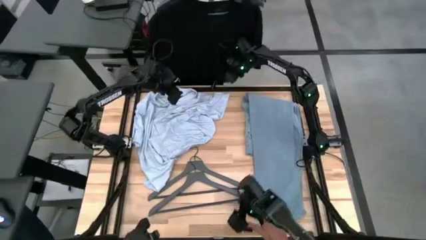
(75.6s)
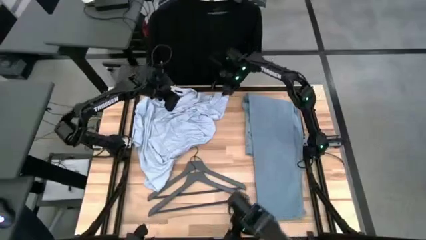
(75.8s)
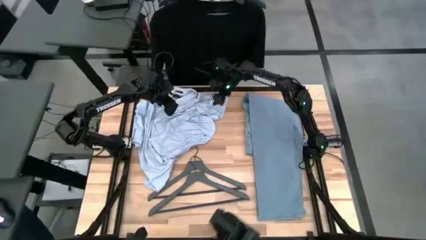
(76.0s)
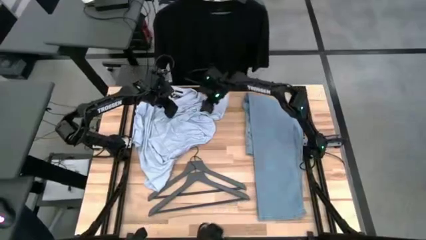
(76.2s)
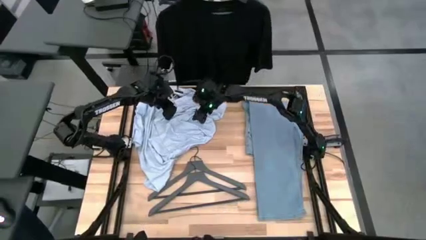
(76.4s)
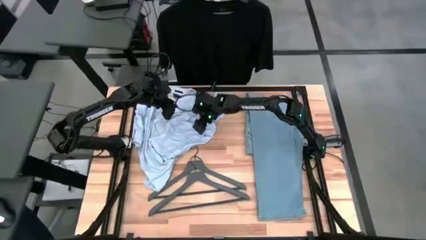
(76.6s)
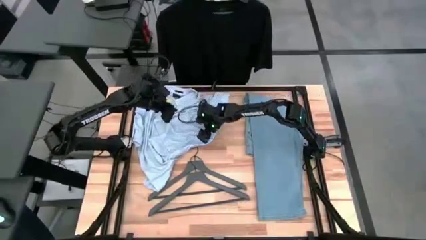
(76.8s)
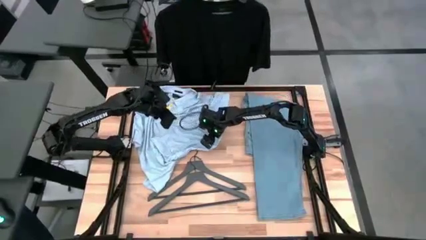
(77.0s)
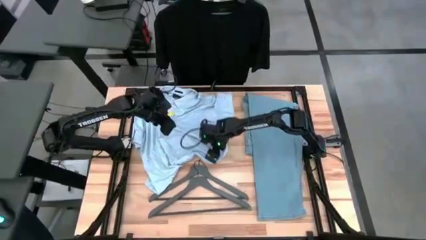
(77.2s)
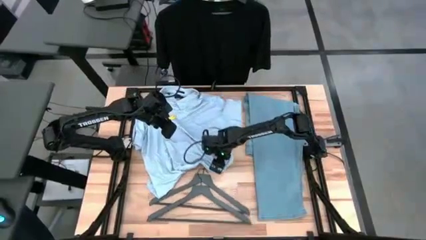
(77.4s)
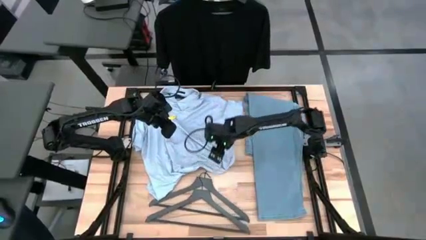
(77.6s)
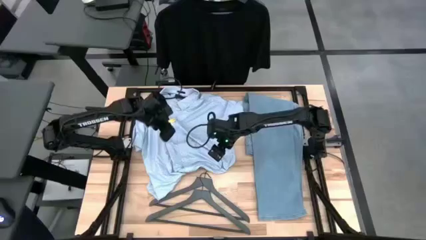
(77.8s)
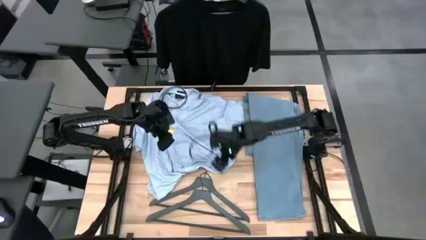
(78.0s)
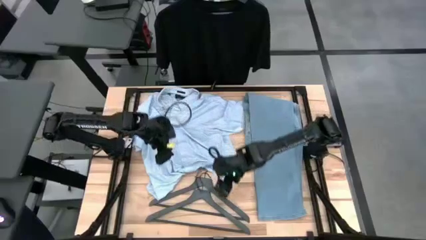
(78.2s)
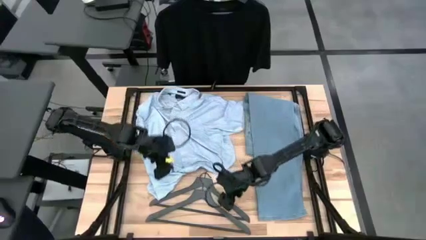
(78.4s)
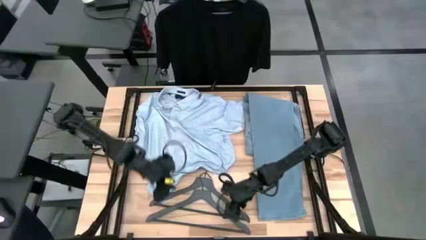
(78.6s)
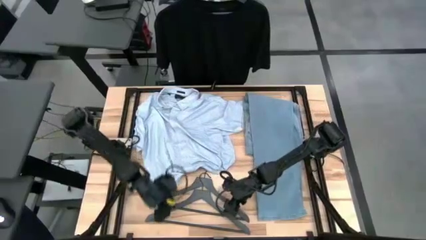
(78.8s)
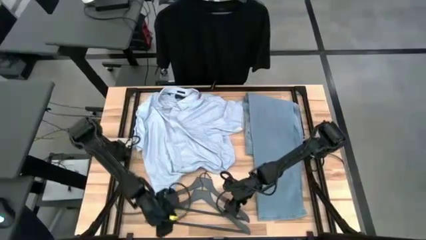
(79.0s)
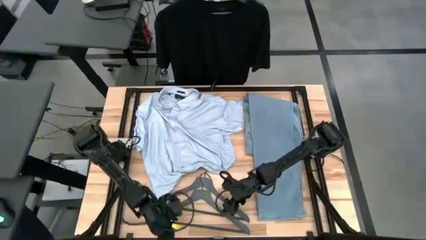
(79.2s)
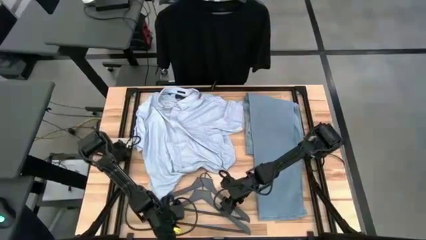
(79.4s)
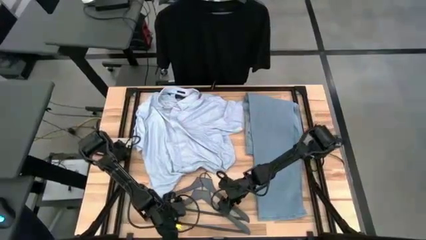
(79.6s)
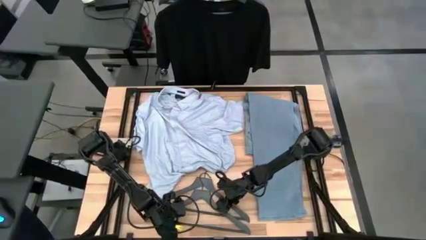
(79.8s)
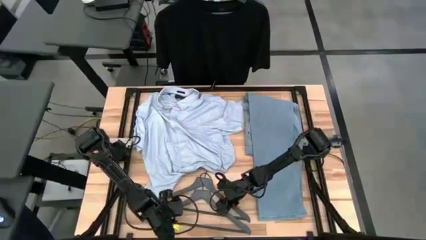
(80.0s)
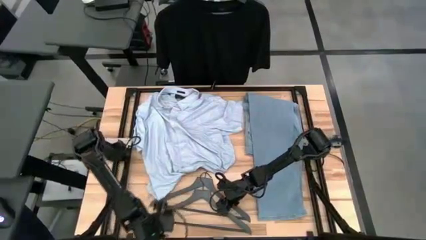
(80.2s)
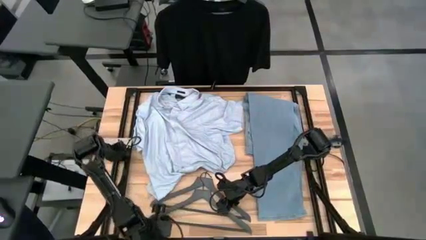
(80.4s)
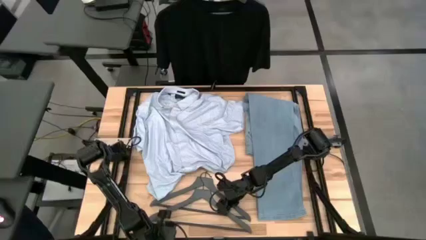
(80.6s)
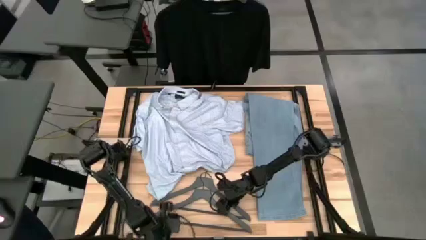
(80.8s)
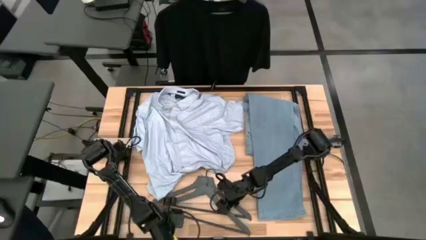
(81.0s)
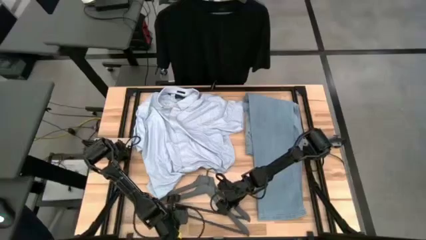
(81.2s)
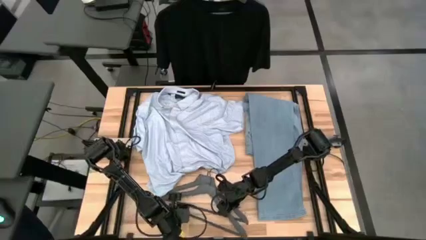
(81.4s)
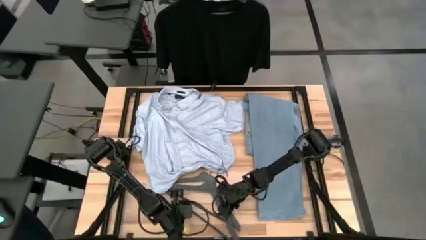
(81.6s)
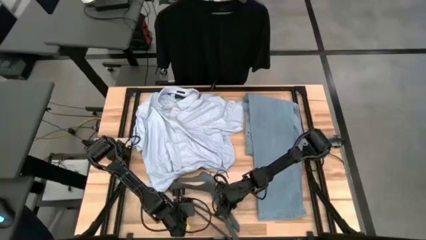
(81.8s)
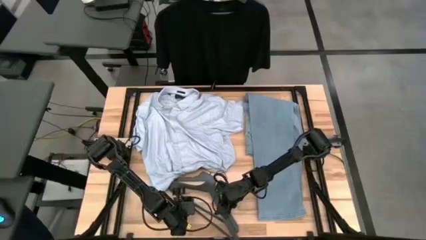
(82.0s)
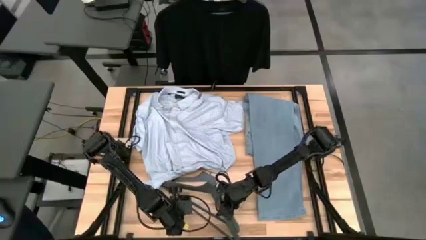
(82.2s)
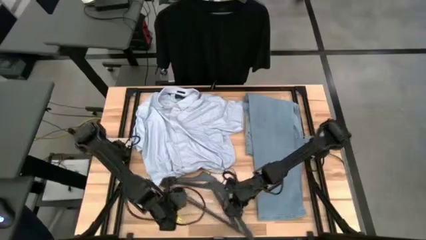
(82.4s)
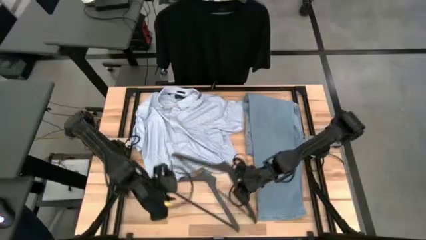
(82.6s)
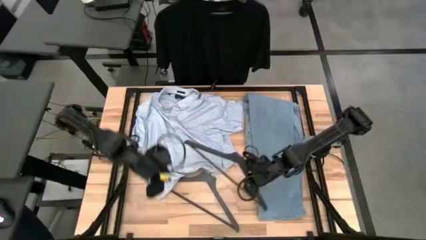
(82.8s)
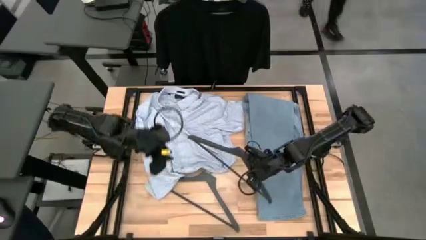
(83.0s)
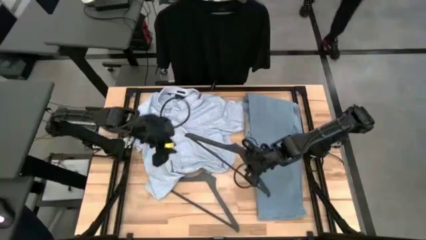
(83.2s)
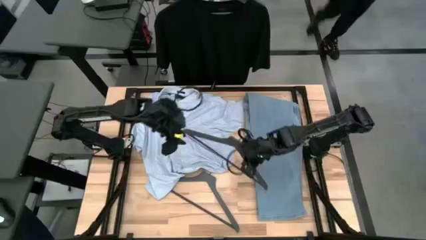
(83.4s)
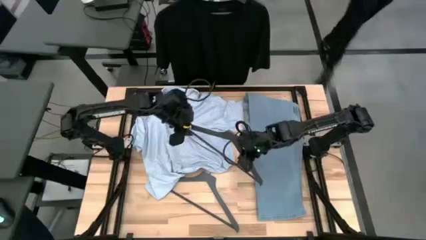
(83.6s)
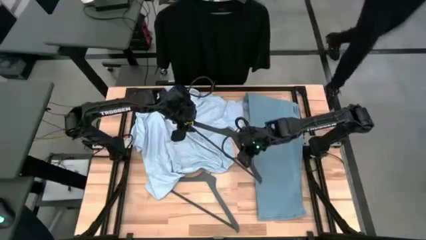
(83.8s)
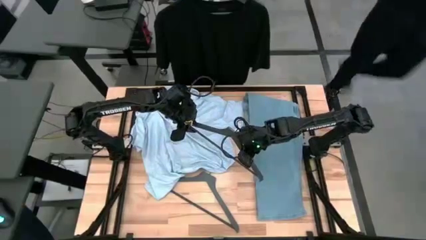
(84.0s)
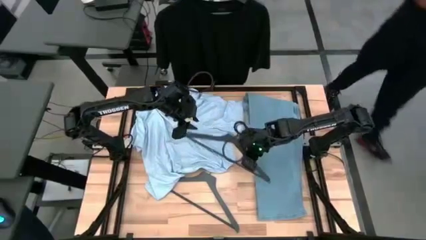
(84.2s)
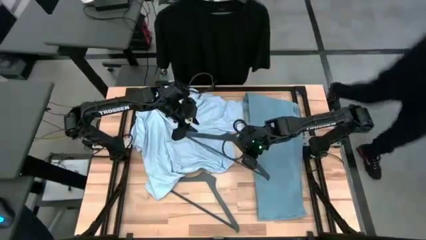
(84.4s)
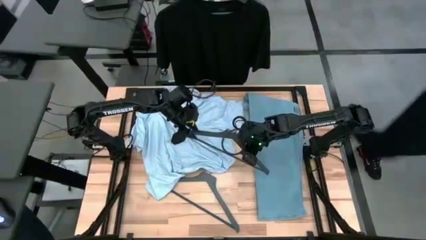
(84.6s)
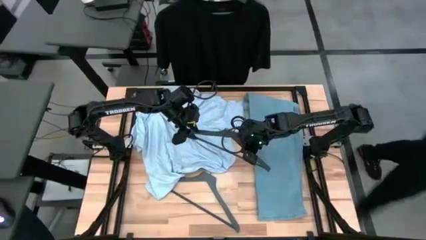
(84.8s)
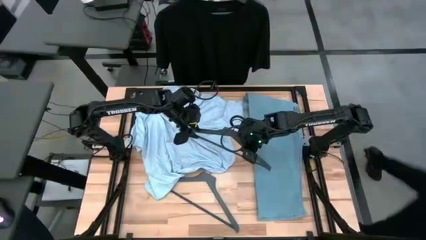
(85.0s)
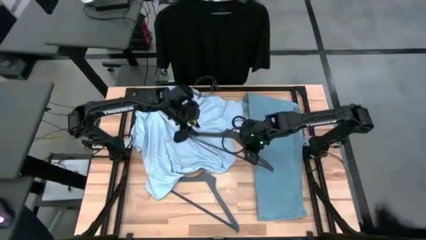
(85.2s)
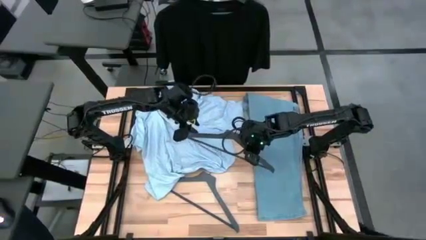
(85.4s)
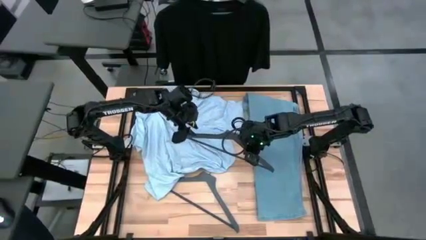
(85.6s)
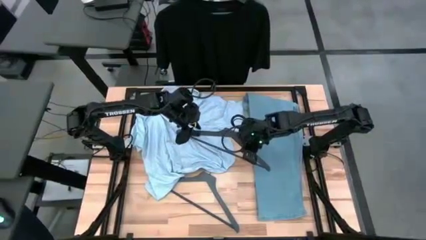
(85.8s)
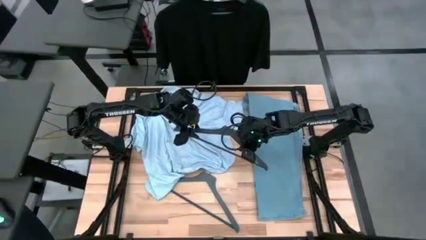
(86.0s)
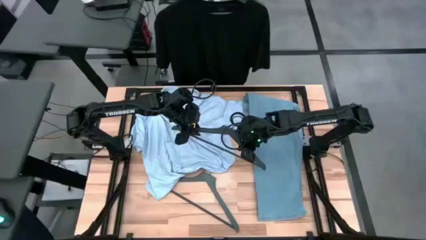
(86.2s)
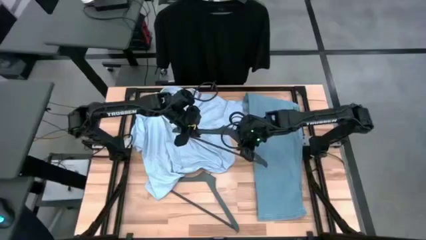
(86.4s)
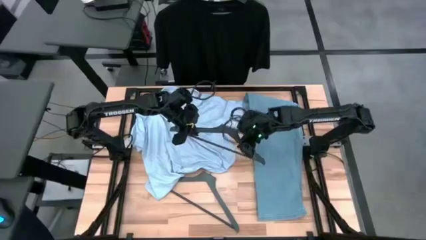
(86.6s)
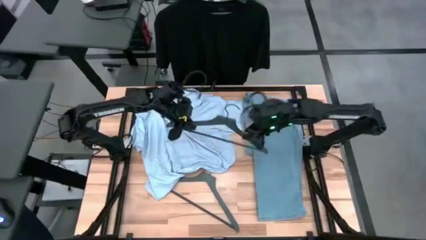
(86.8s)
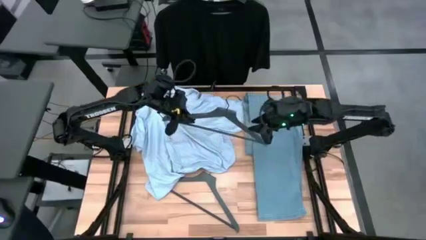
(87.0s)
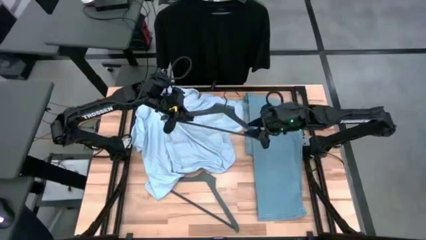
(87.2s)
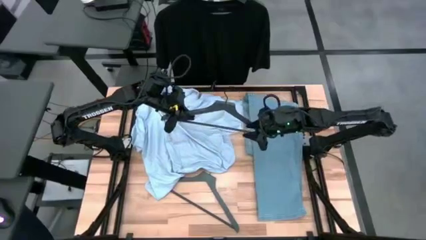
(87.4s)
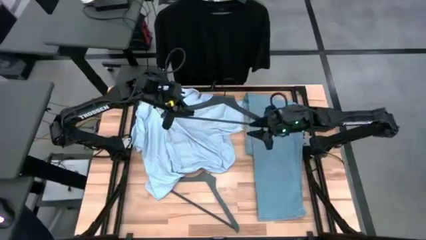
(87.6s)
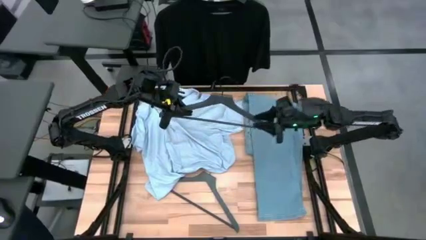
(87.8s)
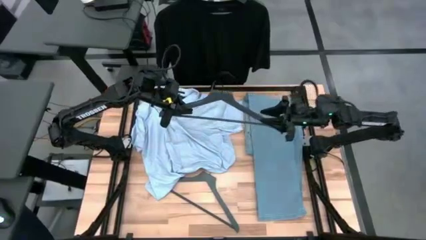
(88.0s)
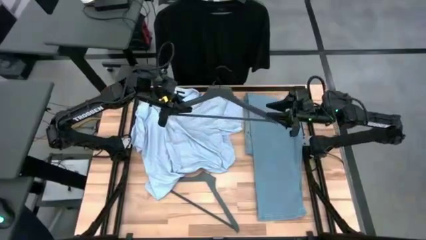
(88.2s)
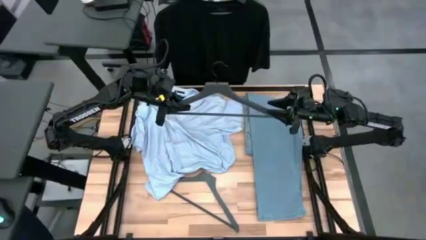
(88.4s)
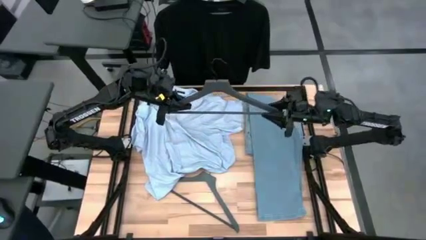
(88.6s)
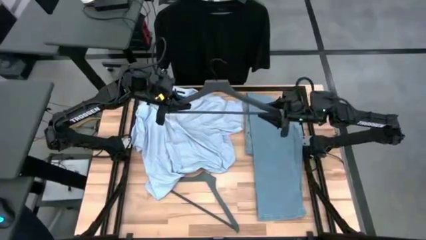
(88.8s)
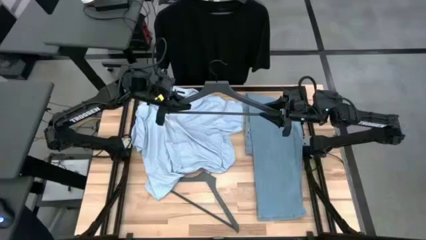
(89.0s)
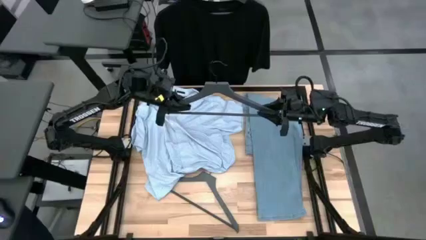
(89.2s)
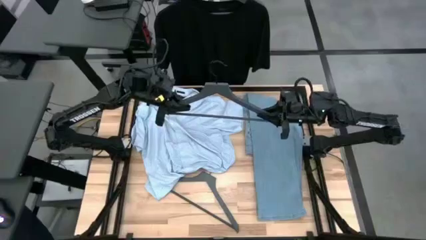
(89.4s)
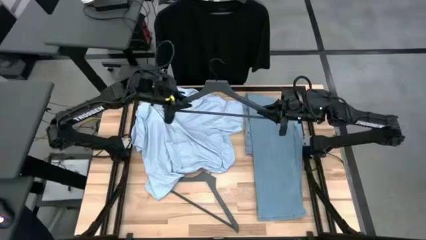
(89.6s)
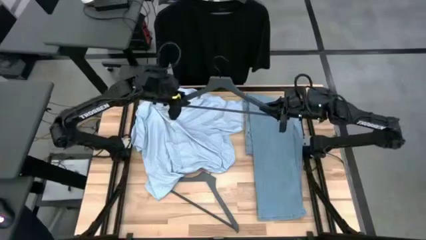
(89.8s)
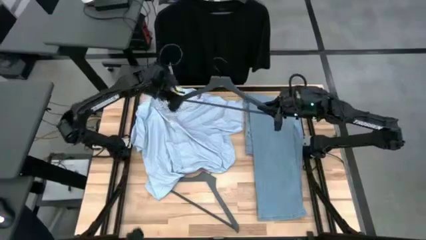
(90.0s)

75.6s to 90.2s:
Task: Hang clothes
Insert the blue shirt on the grey hanger

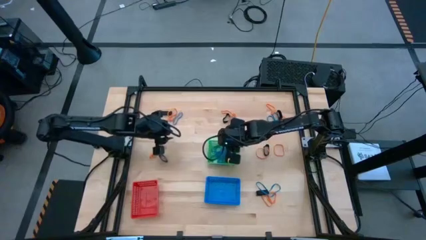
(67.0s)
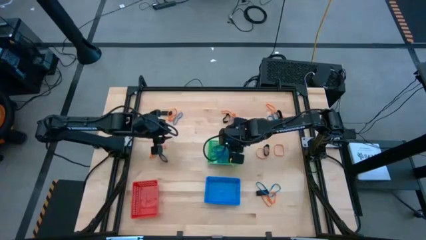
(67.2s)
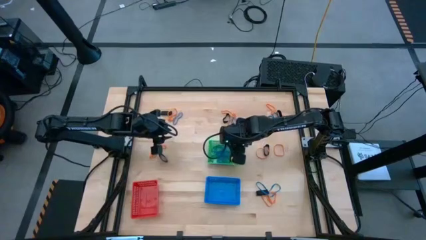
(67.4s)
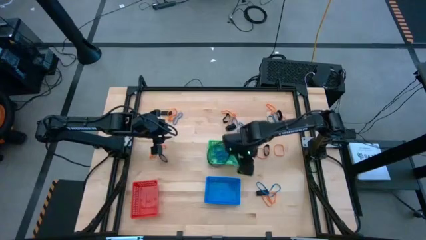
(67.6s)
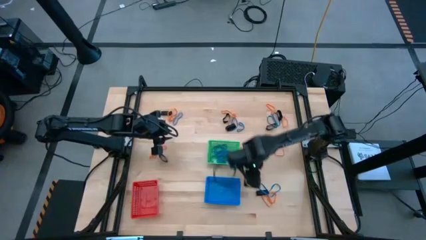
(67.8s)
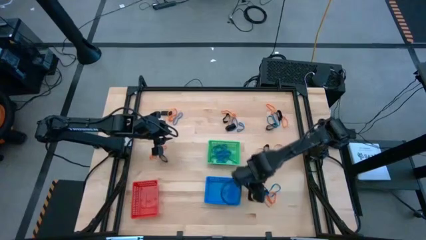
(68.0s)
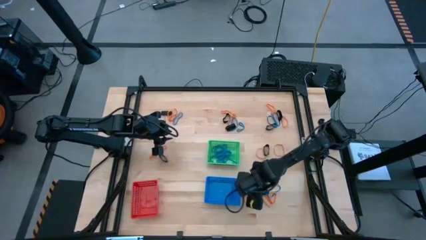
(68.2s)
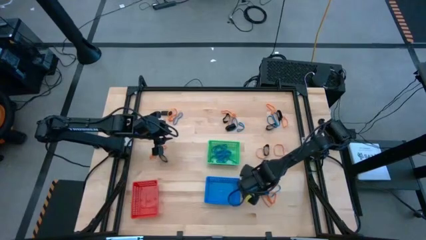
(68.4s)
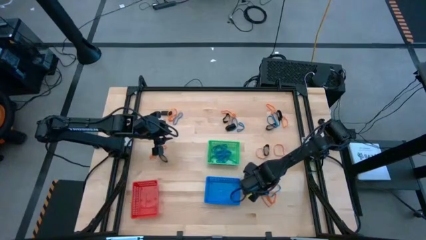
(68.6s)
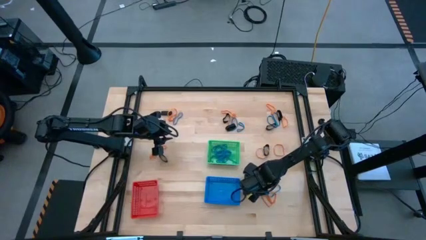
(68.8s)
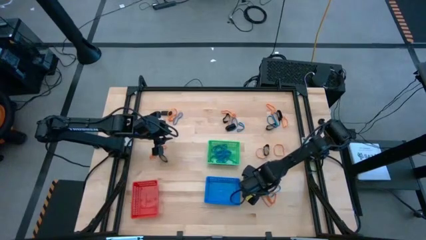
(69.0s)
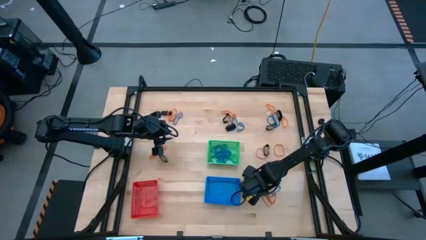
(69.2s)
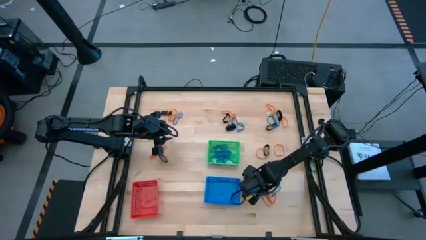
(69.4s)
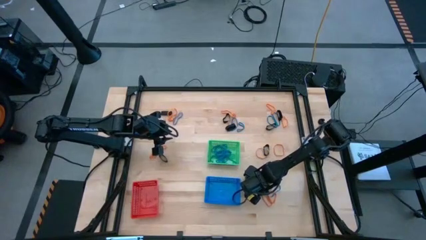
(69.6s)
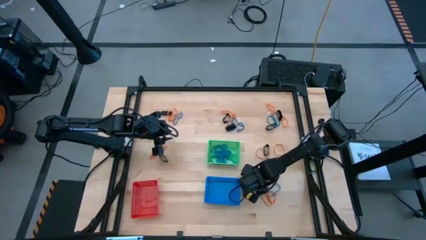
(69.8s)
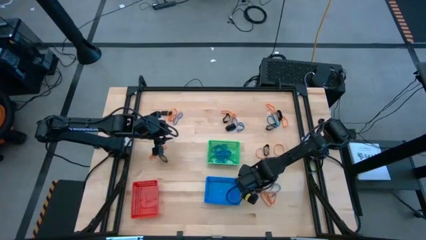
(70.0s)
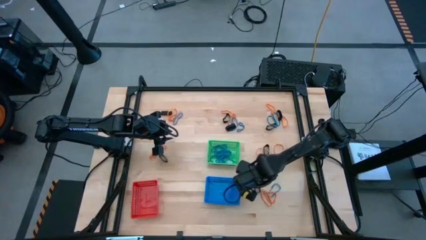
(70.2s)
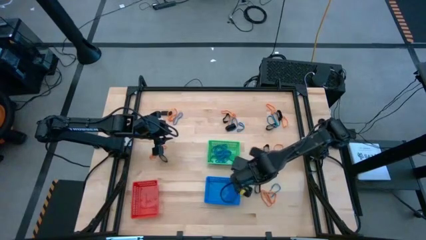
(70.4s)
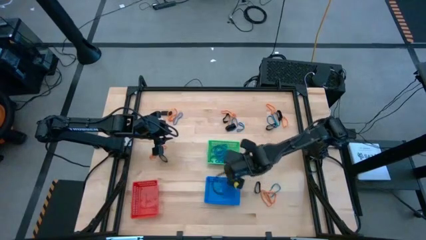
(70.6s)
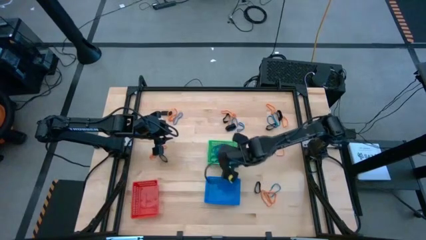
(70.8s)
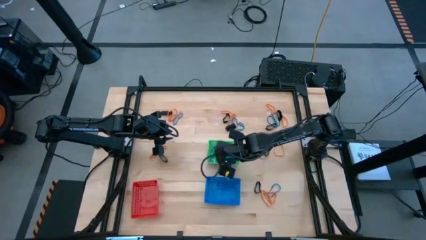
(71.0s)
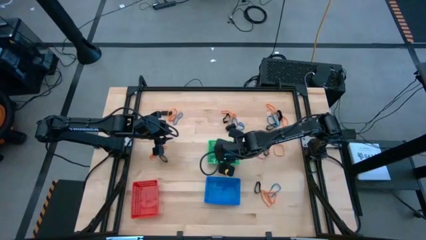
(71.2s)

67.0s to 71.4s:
Task: Sort rubber bands into baskets
Put the blue rubberband into the green bin
